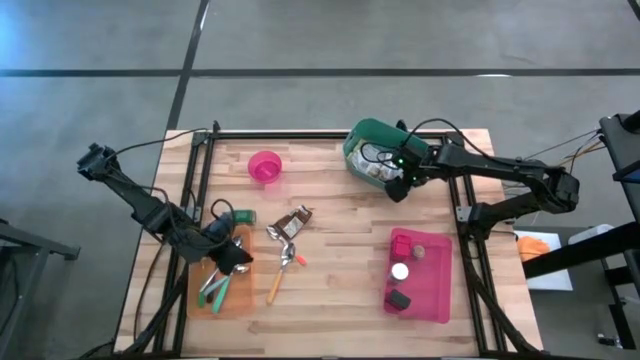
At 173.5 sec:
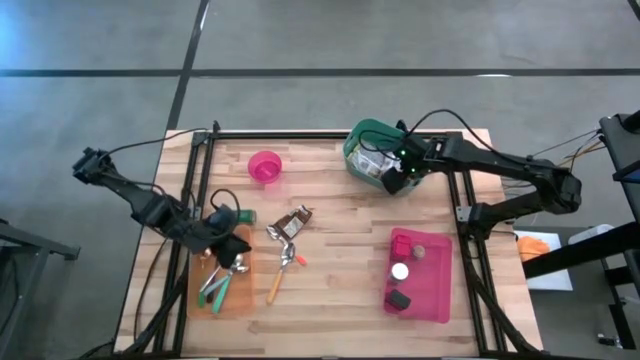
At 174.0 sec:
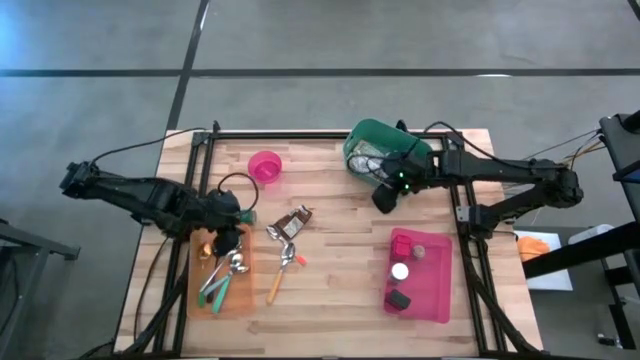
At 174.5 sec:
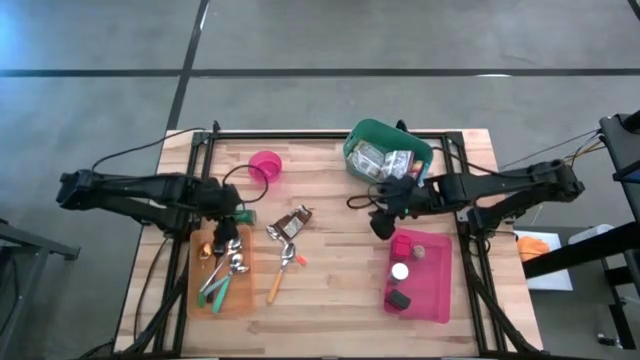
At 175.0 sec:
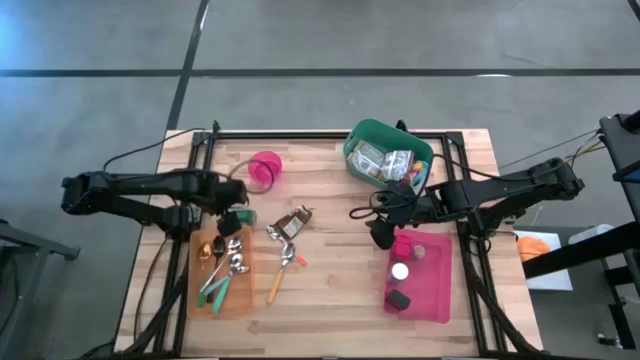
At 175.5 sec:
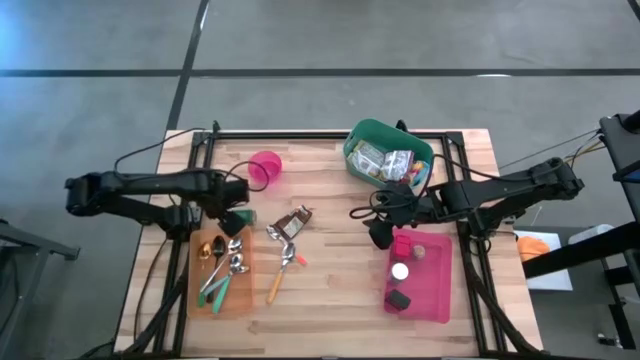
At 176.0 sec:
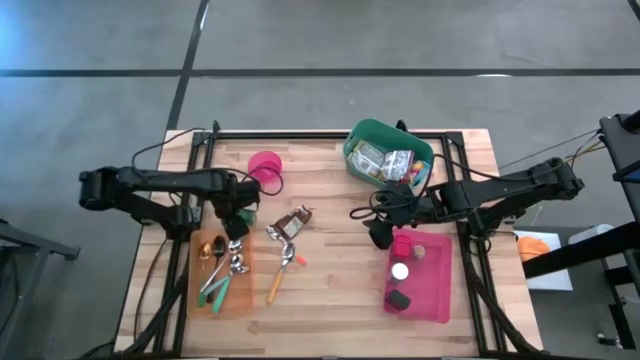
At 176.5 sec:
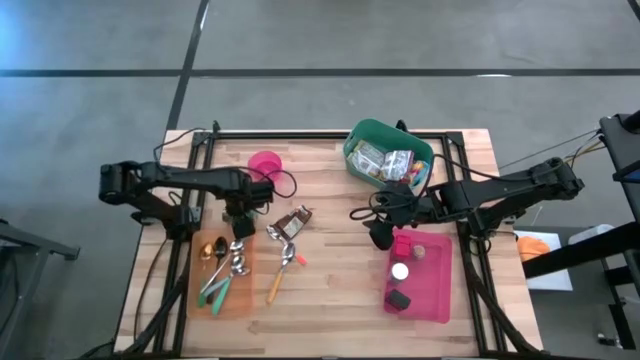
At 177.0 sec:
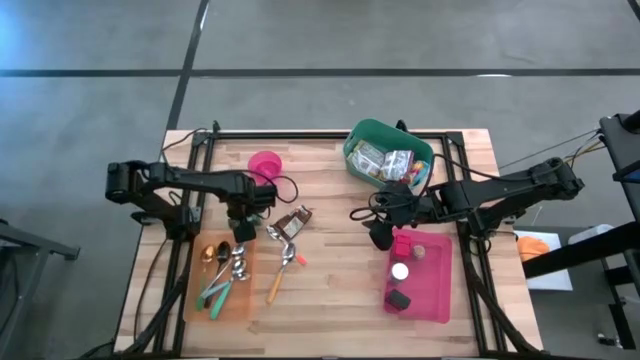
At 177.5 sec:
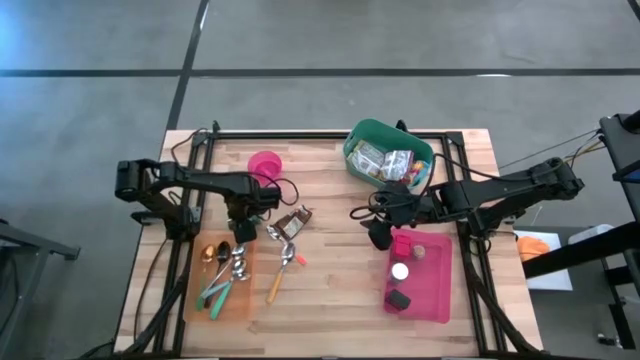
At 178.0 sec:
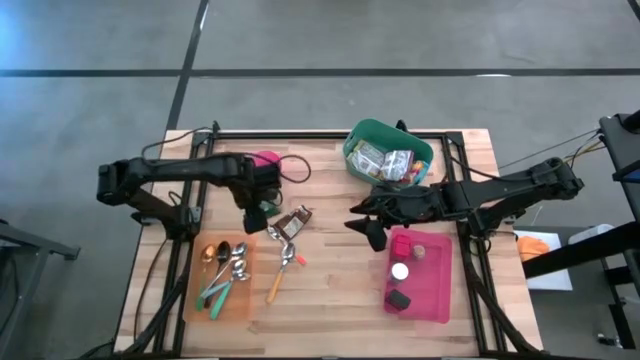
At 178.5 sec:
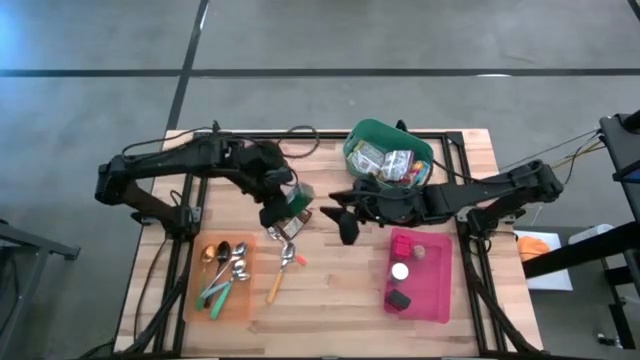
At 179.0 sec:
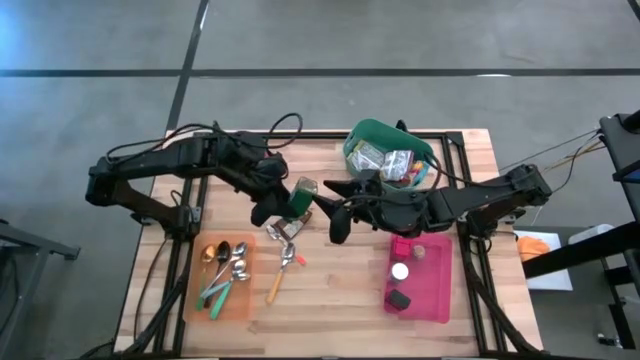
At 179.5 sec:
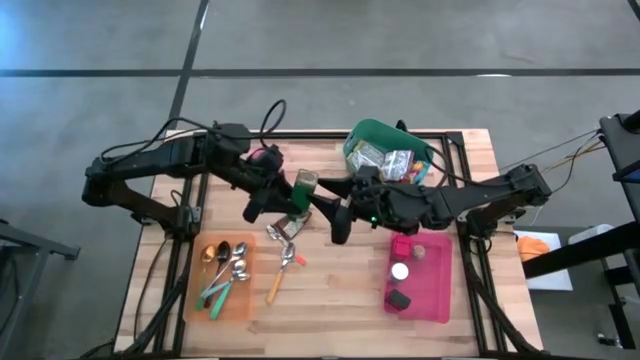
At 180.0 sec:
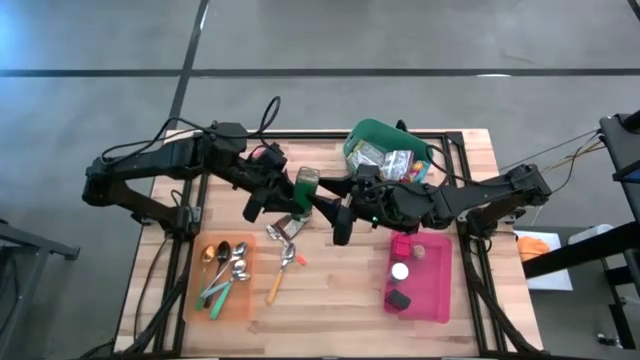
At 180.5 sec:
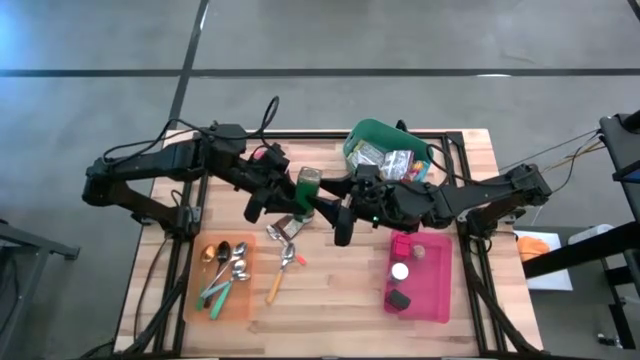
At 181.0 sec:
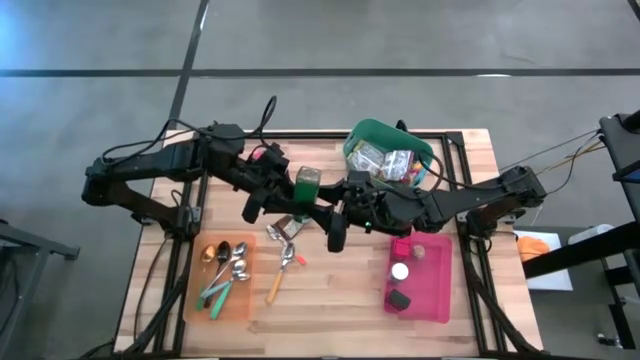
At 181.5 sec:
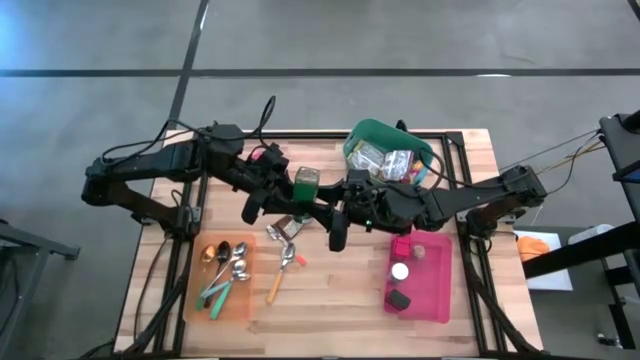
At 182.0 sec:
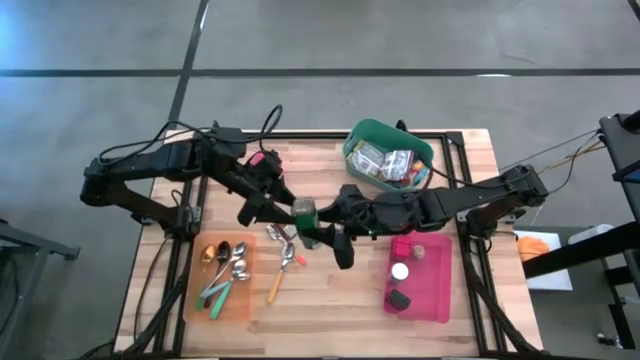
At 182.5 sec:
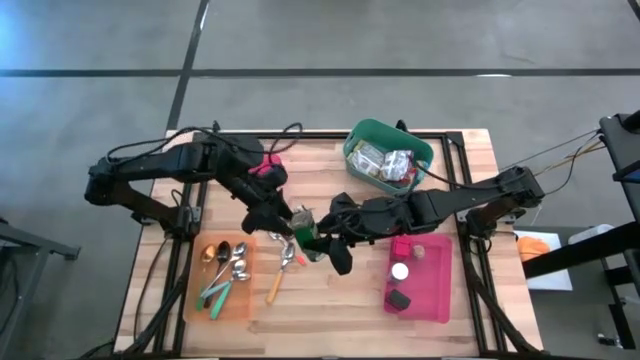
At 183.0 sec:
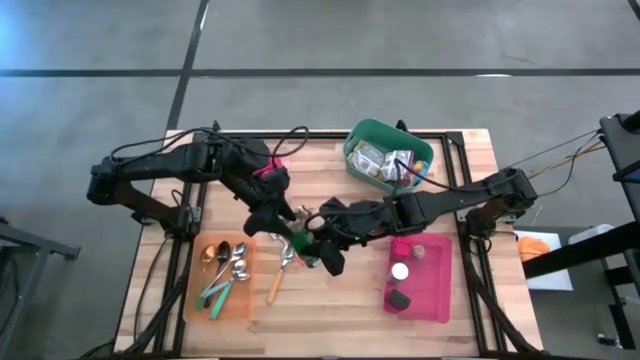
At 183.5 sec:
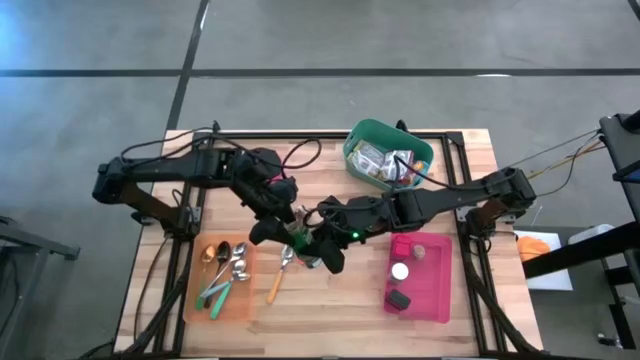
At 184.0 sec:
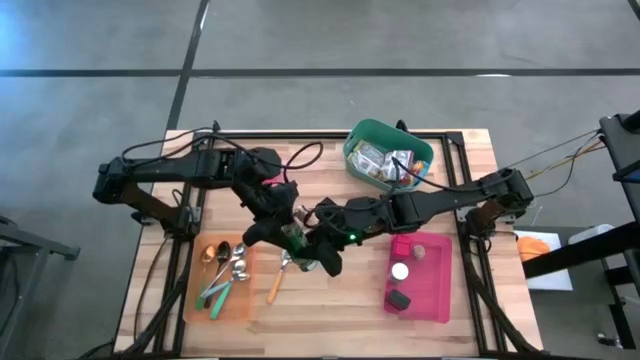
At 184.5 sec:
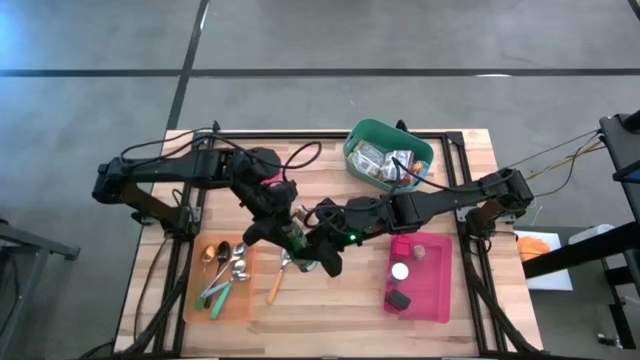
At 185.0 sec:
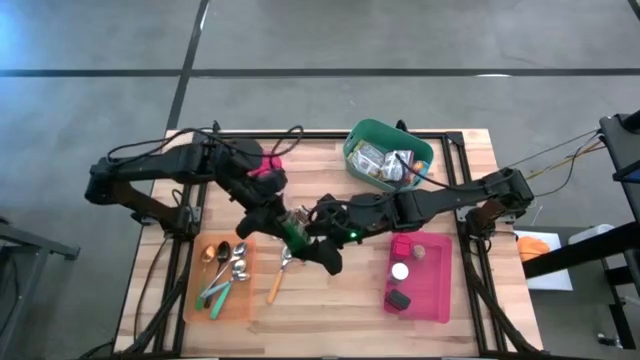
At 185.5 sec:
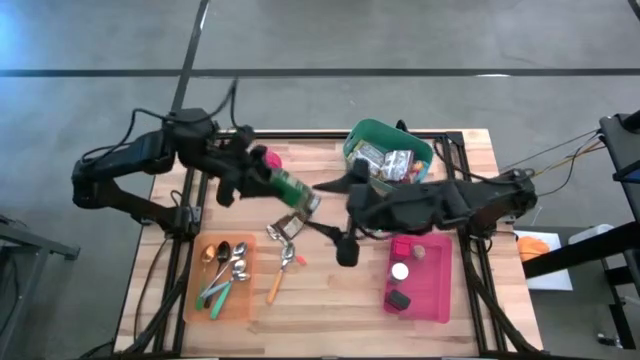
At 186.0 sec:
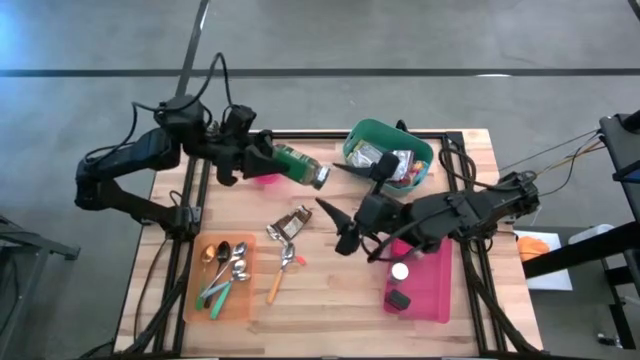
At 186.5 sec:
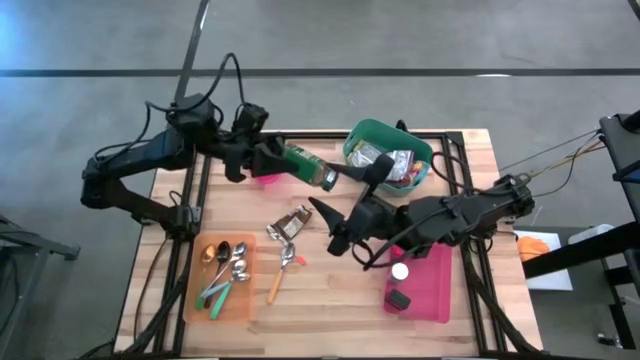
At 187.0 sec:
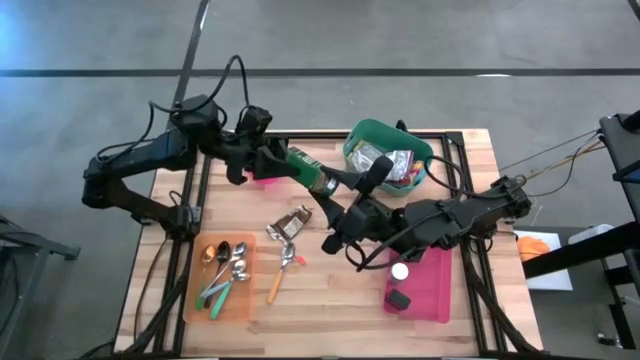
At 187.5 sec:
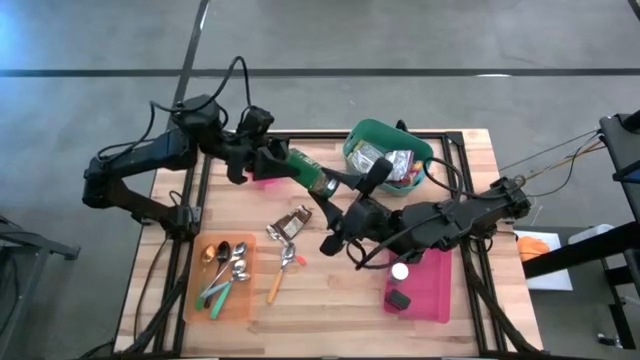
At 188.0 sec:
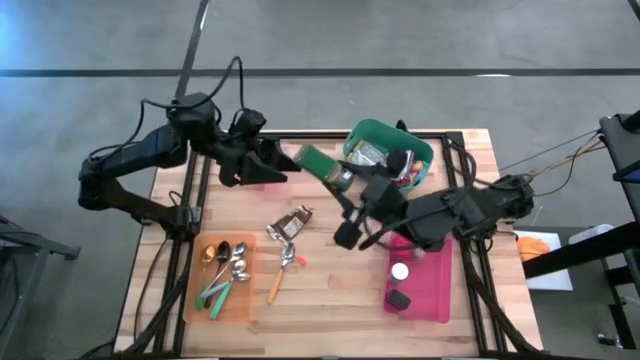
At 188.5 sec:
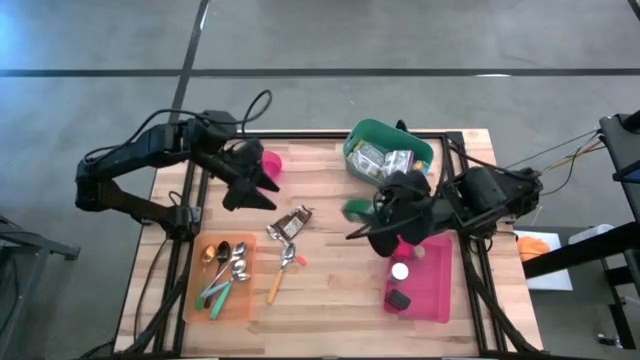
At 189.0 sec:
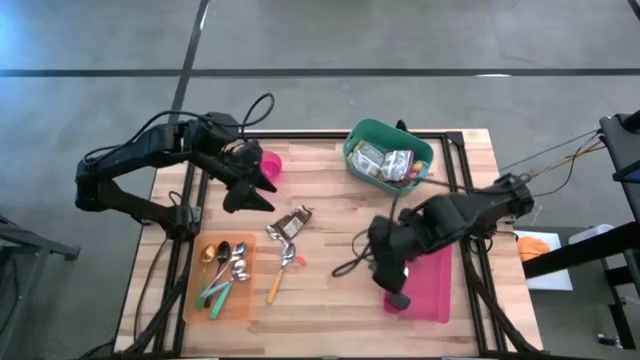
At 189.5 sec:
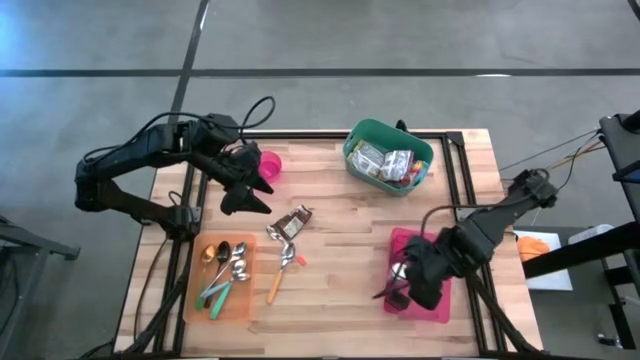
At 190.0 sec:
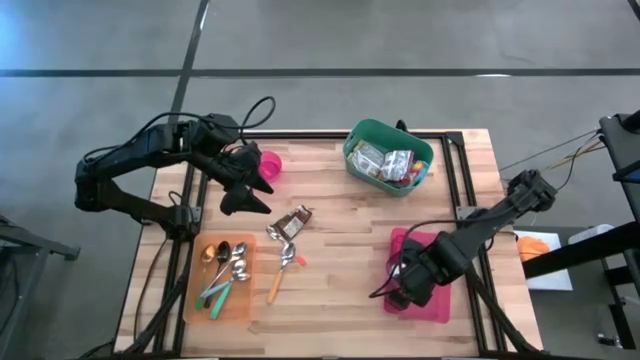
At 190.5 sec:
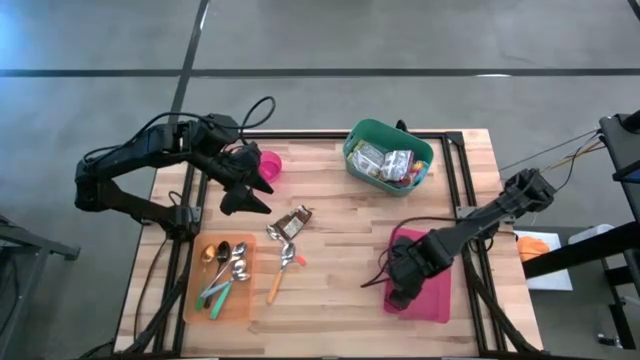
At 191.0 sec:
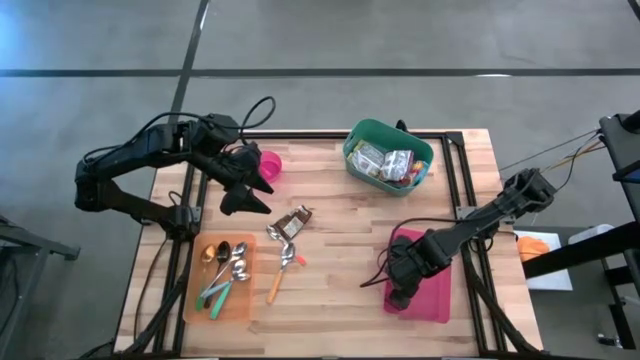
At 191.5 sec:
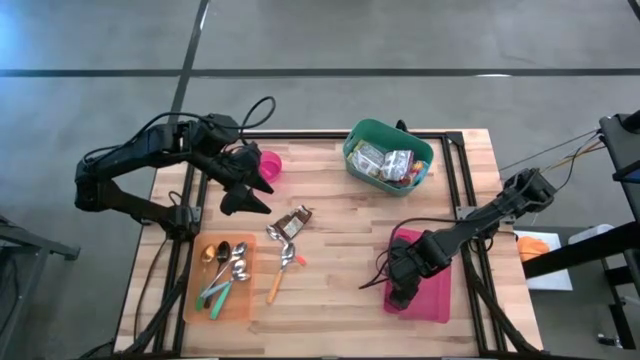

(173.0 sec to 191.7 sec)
Task: Pick & Place Food Item
Put the green seasoning bottle into the pink bin
